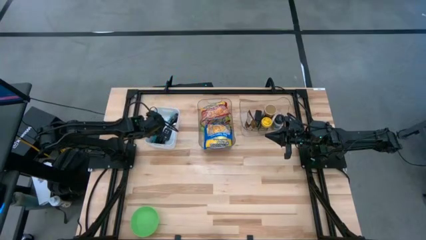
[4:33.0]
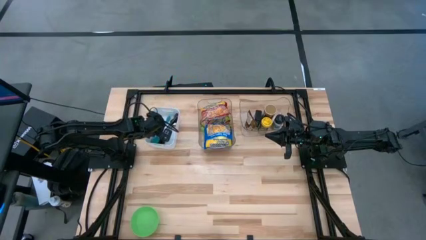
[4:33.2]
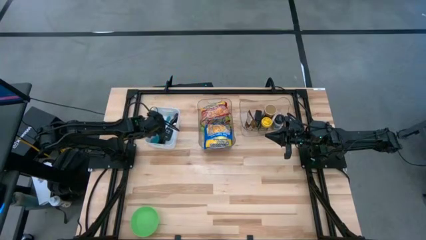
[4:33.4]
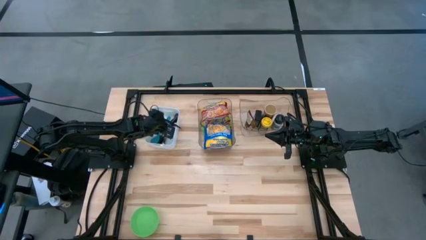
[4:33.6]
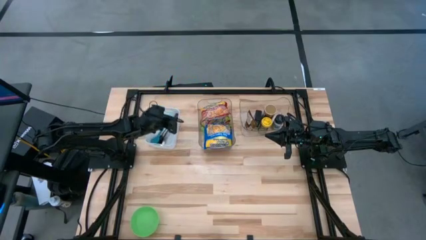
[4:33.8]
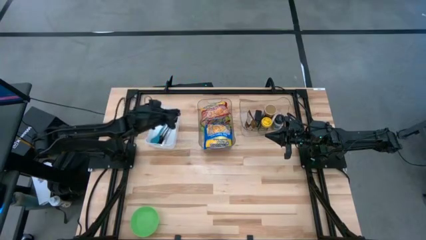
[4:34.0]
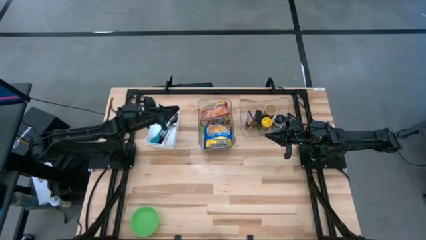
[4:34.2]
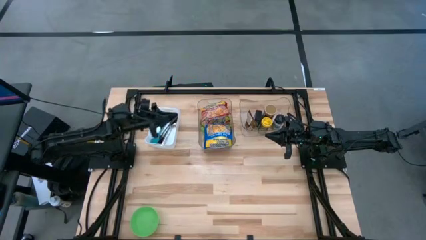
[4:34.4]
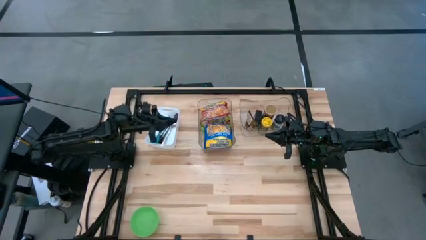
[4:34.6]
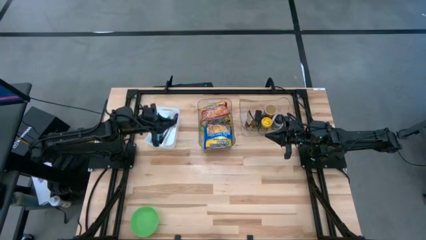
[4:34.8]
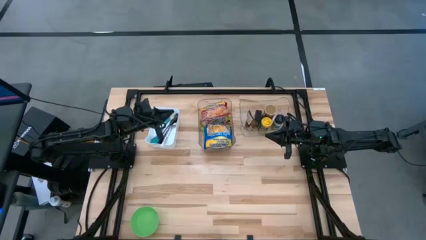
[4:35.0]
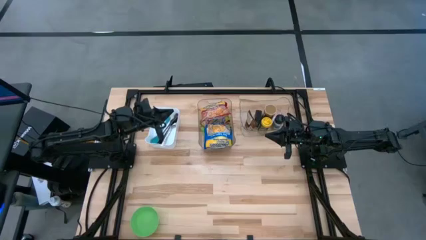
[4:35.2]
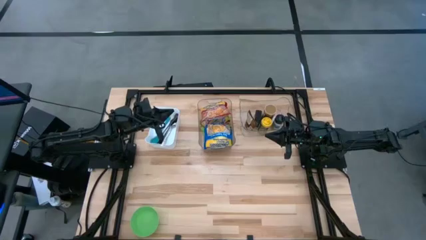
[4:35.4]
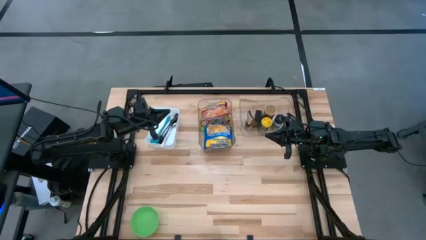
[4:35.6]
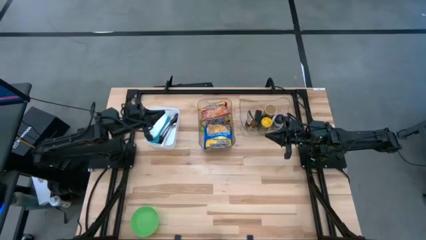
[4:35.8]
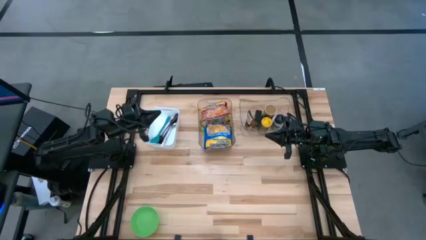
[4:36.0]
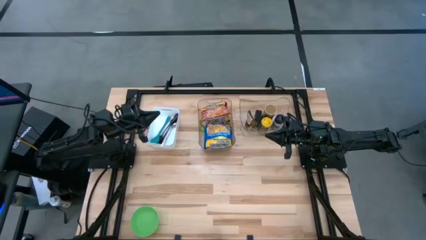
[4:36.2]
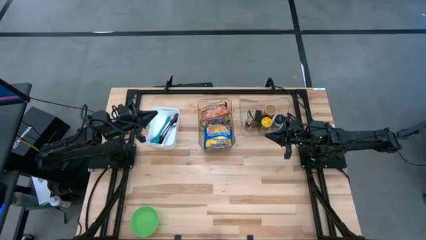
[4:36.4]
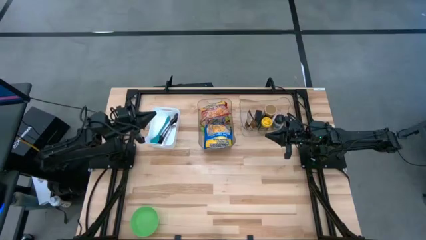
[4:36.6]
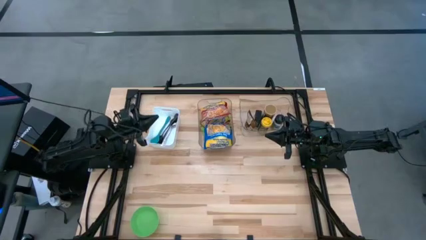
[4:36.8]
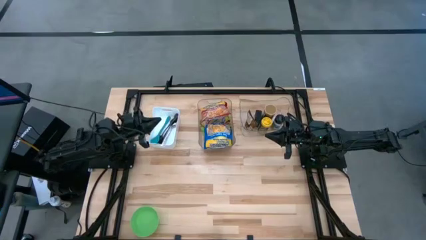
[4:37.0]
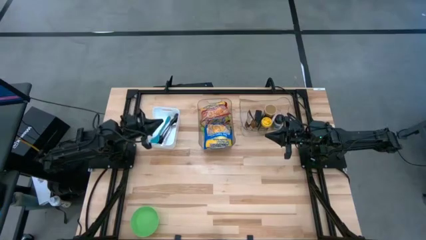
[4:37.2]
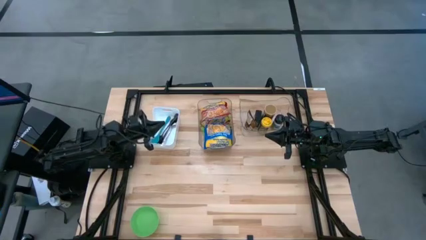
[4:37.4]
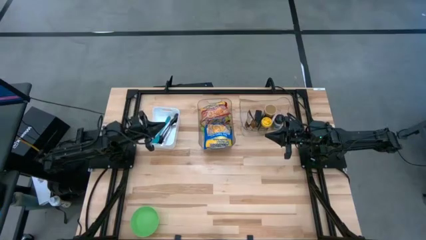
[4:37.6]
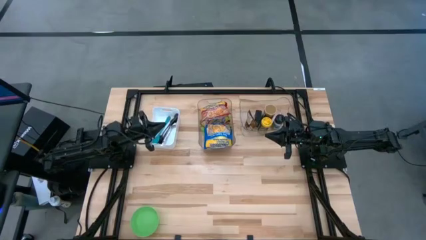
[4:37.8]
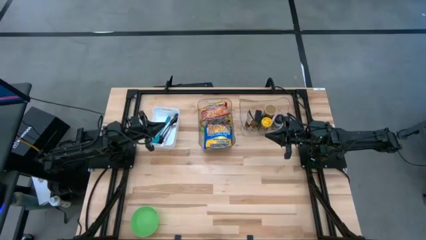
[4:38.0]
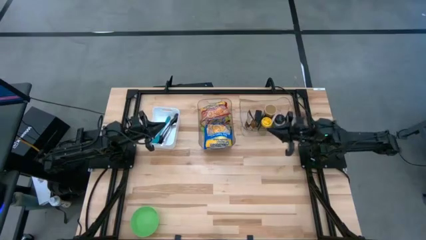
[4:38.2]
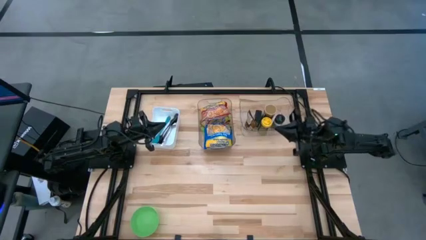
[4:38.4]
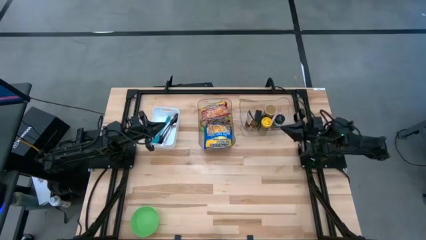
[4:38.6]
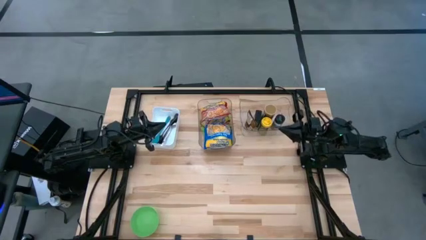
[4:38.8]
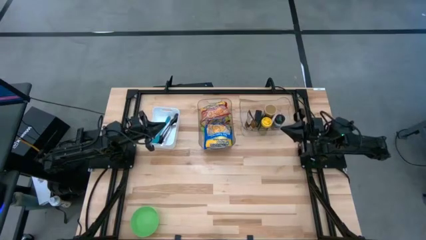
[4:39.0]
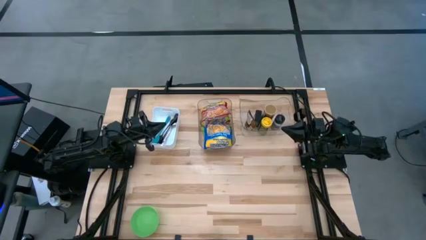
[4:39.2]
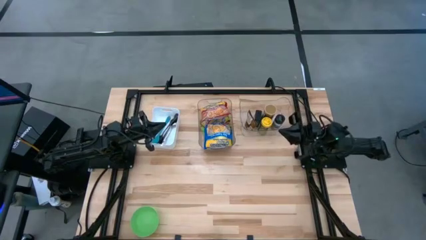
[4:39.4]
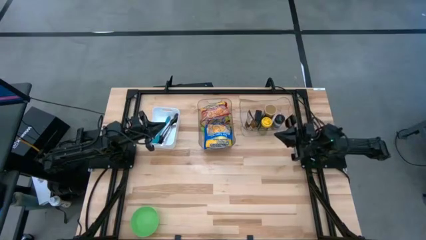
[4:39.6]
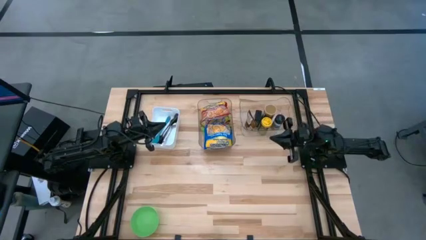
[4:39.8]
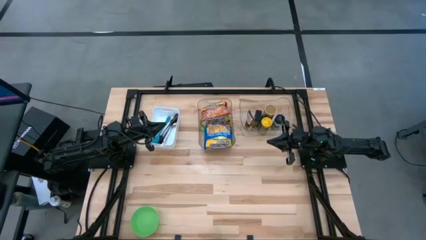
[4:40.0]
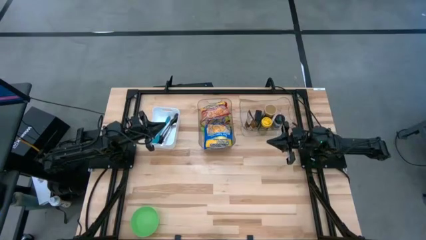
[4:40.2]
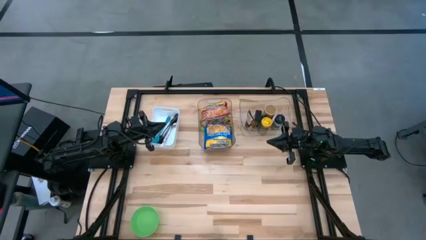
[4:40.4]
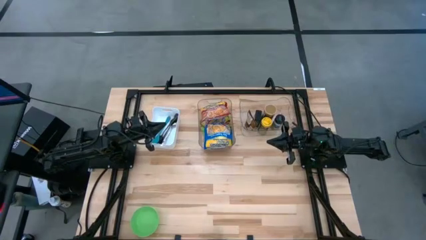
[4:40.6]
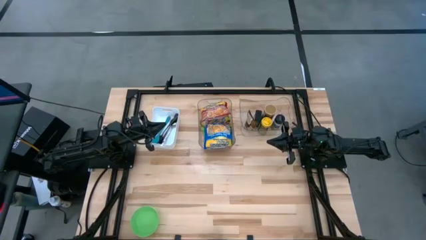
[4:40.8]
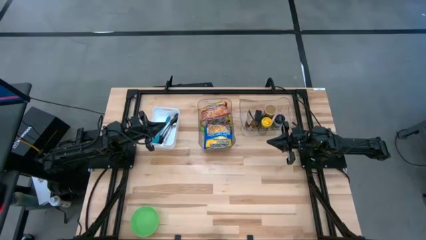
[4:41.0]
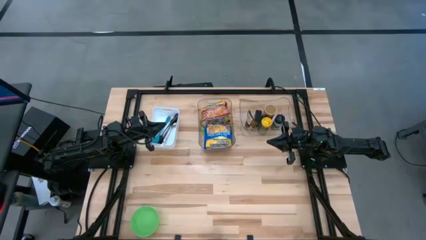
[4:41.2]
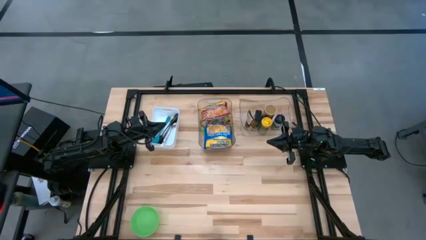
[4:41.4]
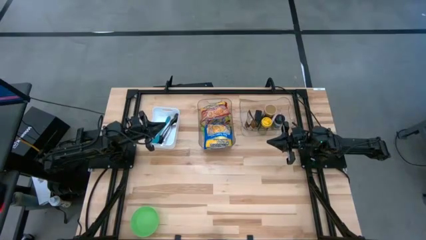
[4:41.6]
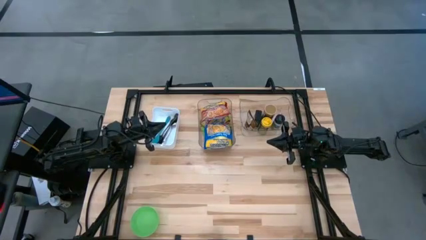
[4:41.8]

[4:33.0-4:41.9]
Task: Pick & Place Food Item
Return to Home Position

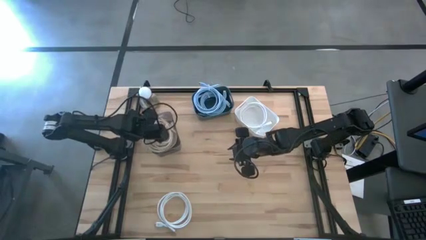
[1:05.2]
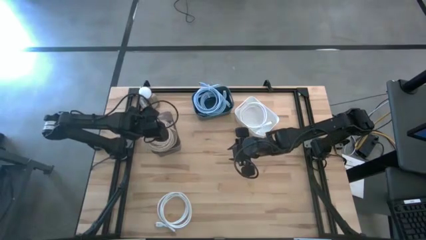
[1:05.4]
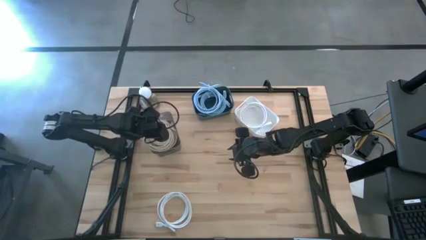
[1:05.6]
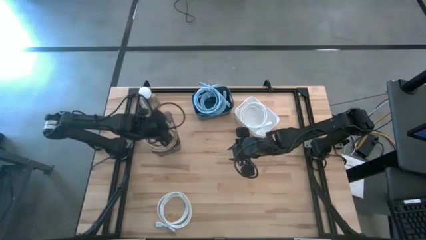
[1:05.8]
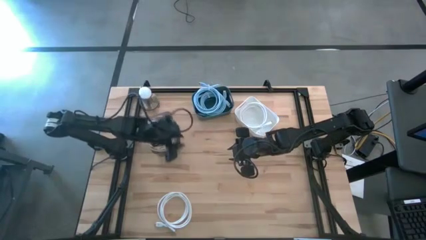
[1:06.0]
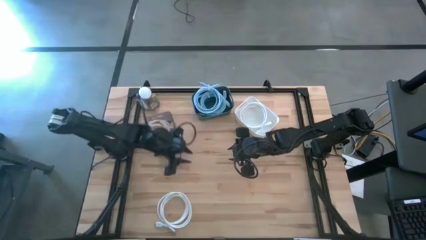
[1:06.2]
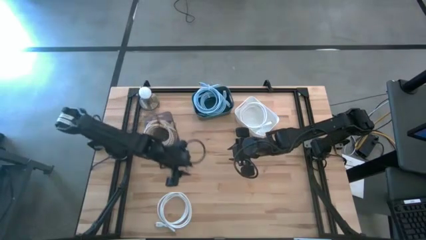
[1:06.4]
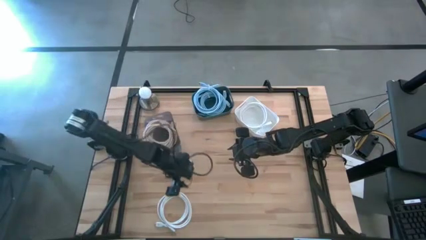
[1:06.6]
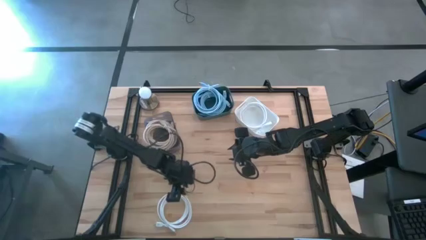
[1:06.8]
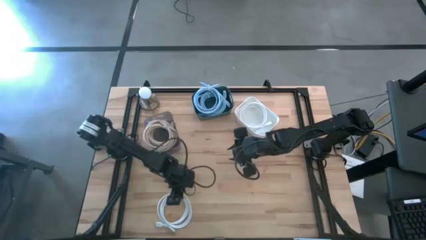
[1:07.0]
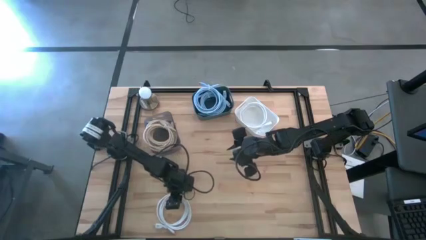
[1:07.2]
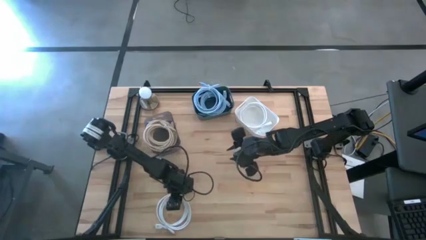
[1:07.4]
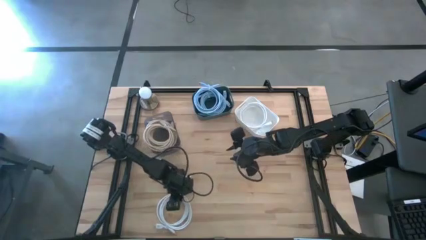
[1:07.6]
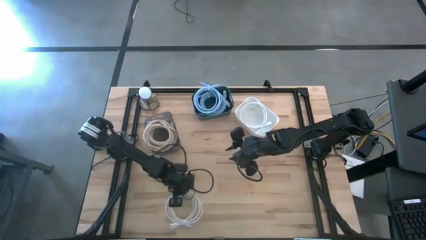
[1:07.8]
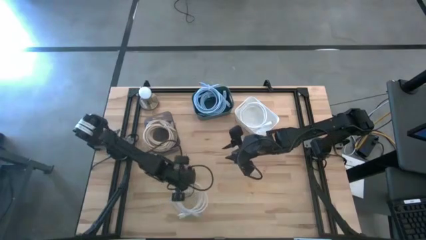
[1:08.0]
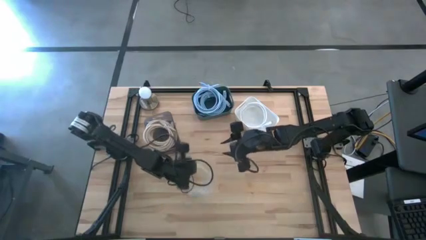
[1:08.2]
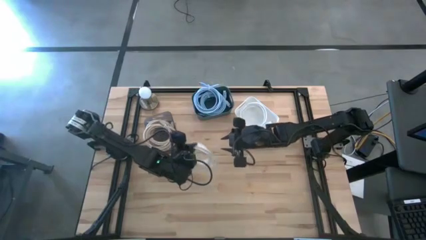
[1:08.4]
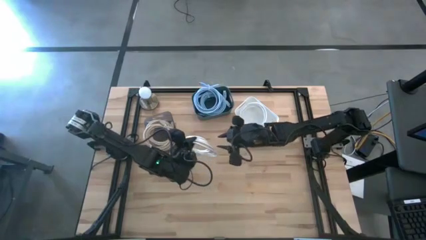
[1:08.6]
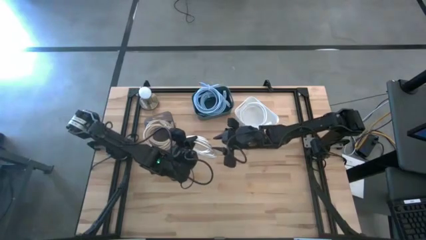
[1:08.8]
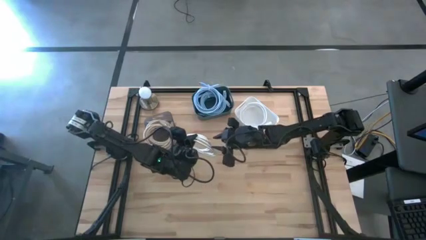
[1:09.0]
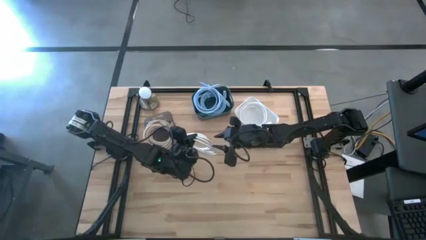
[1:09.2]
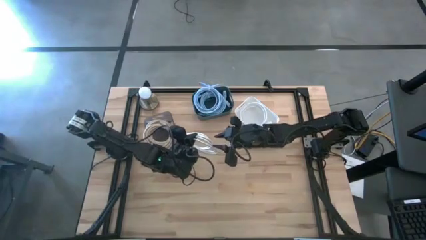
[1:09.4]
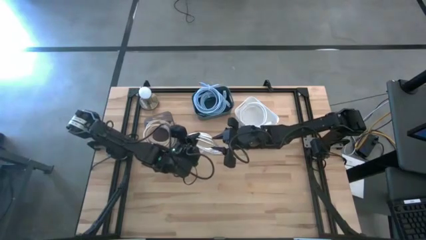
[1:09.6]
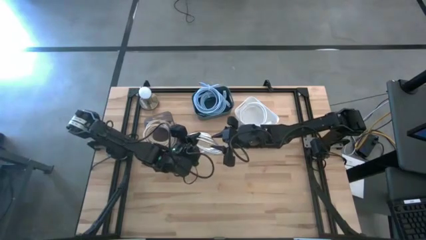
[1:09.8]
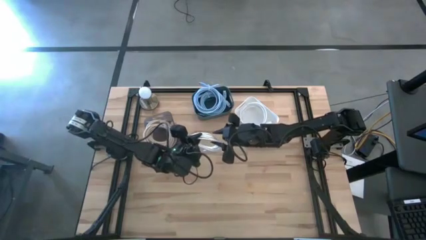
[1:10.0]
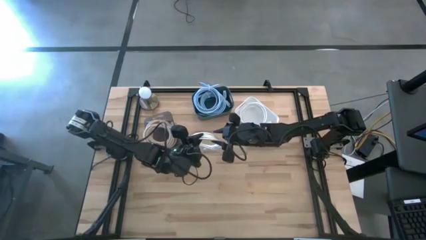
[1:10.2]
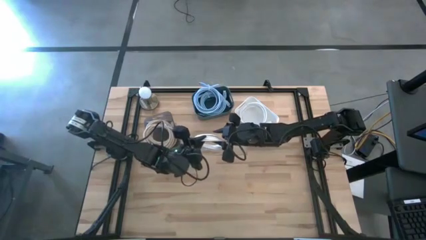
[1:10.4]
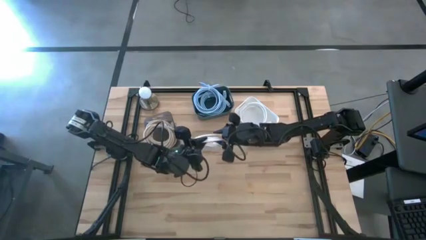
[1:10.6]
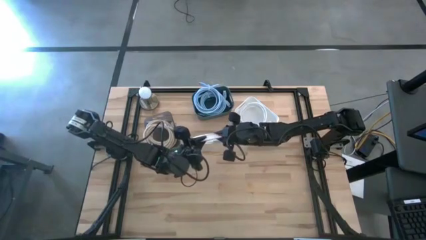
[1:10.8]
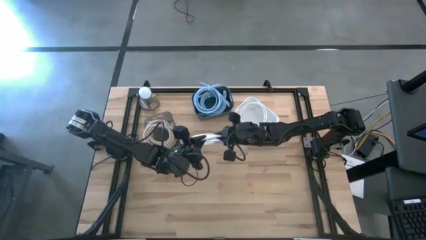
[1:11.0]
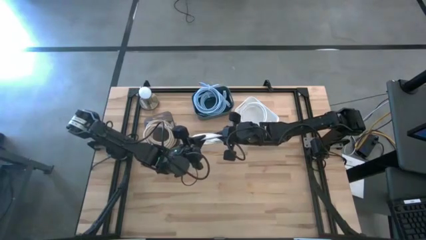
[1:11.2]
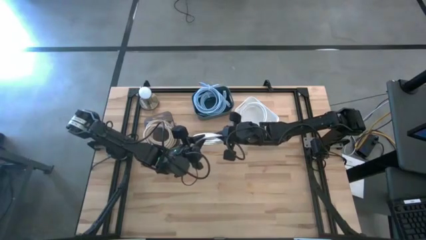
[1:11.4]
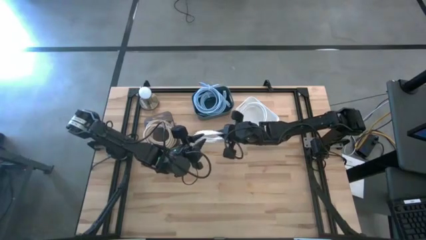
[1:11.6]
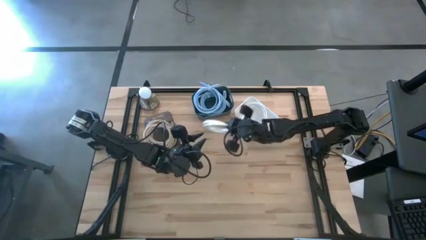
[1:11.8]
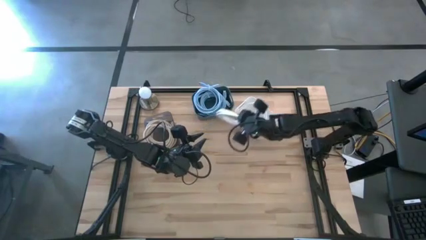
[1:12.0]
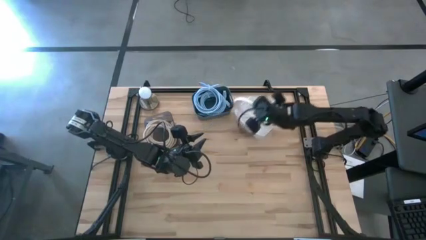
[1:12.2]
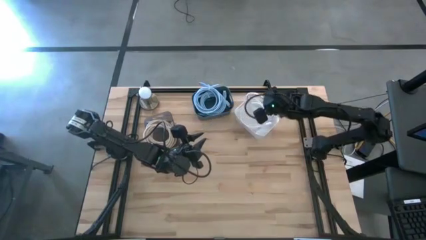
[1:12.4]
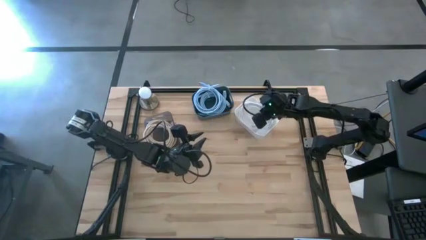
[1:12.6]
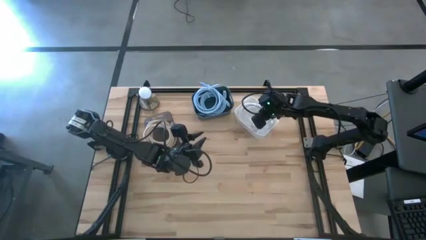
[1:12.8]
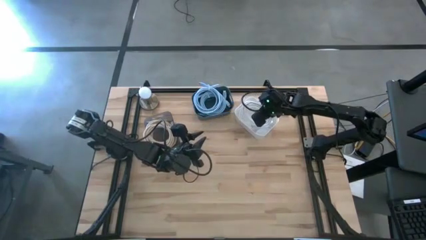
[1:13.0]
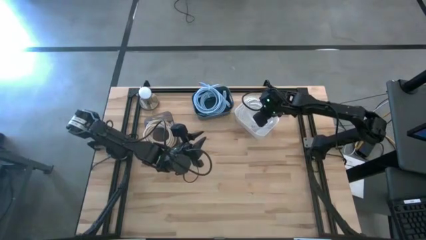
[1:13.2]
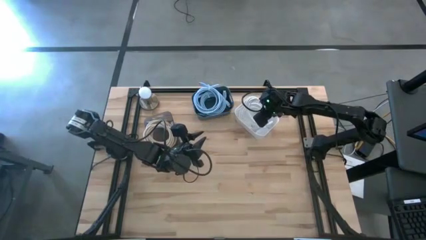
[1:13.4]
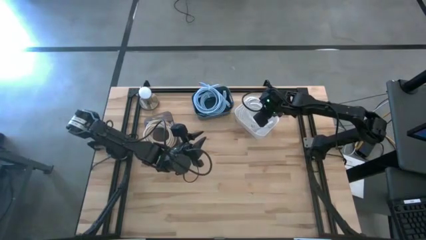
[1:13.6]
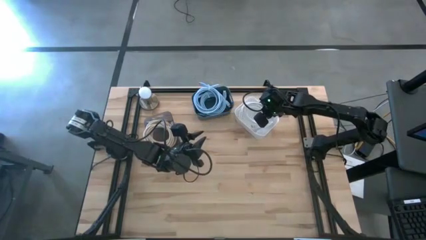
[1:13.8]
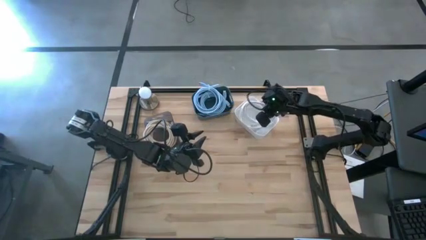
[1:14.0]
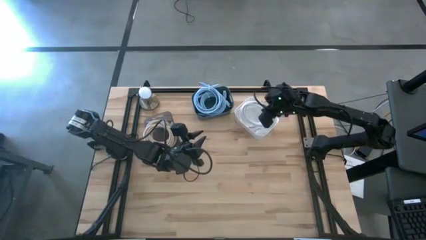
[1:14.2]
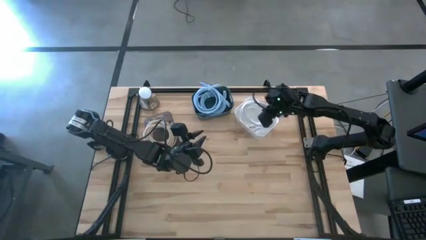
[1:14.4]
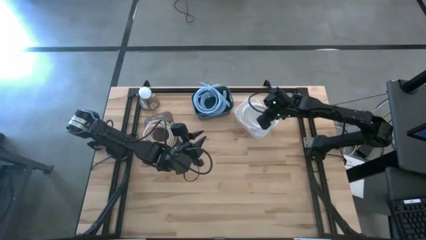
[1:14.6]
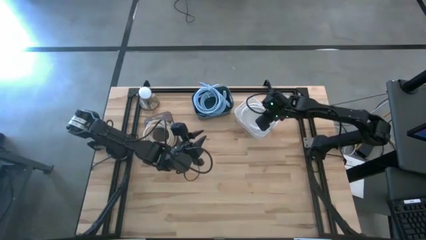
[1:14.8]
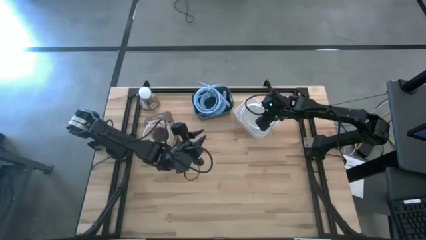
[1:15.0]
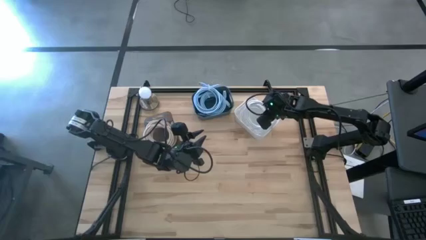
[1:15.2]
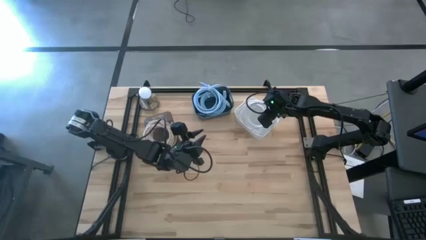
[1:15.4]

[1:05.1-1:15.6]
Task: Sort HDMI cables
Put the white HDMI cable into the white bin
